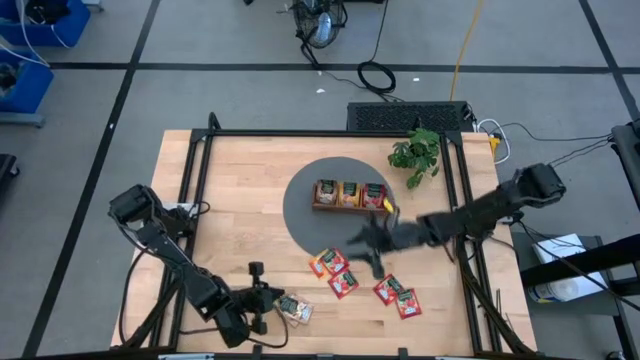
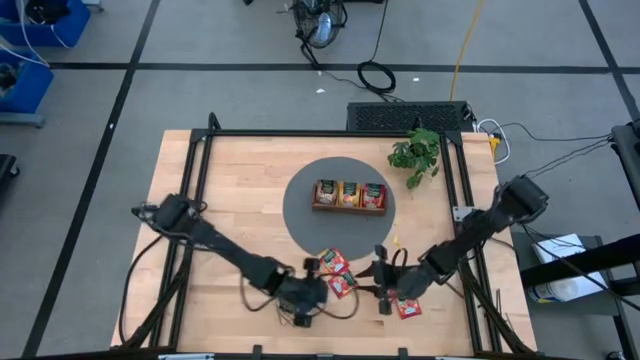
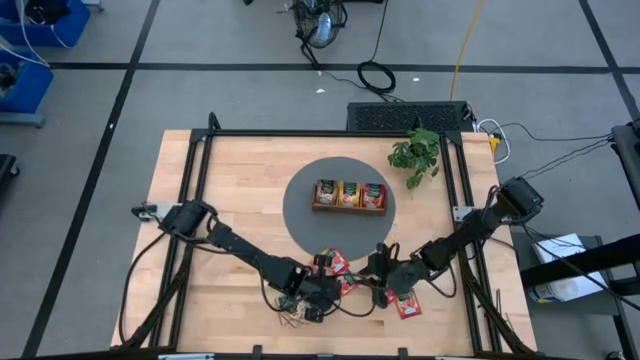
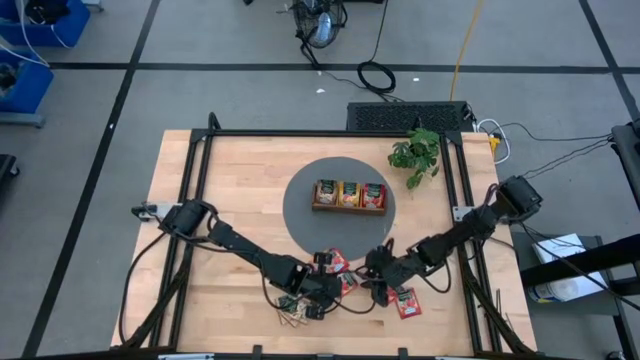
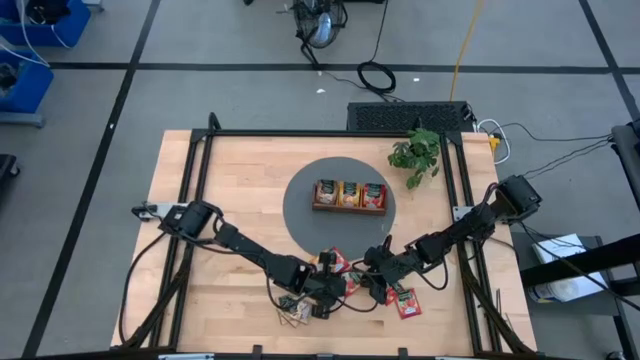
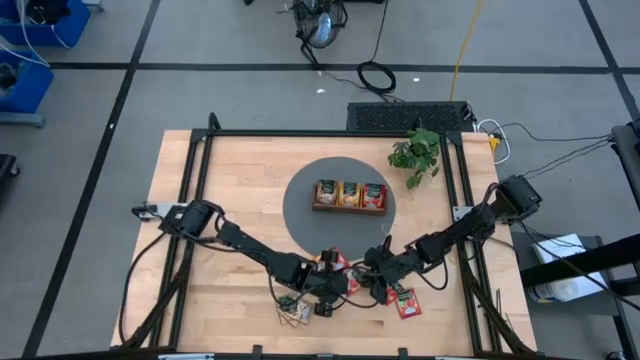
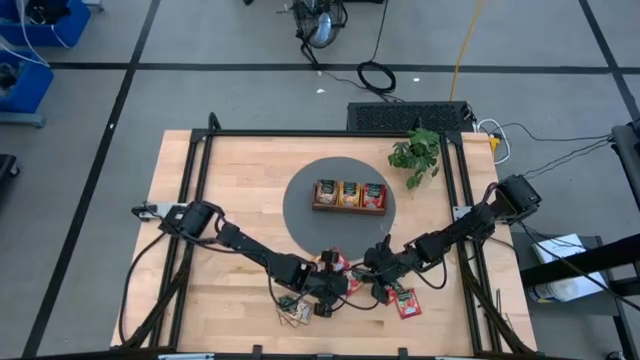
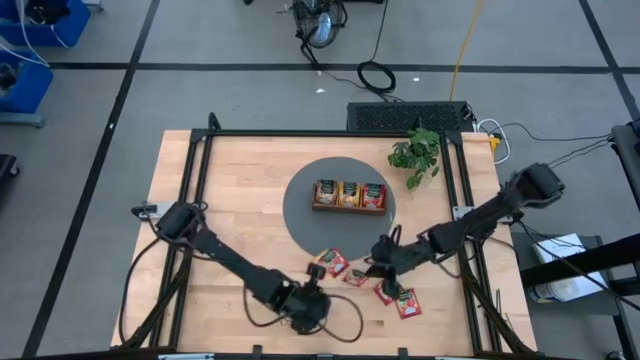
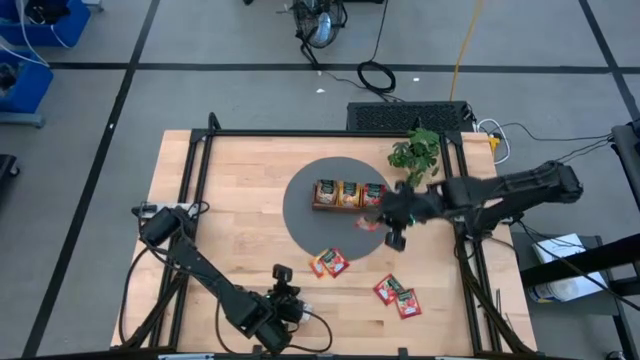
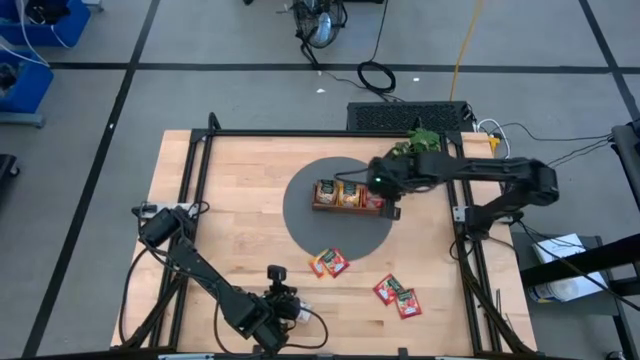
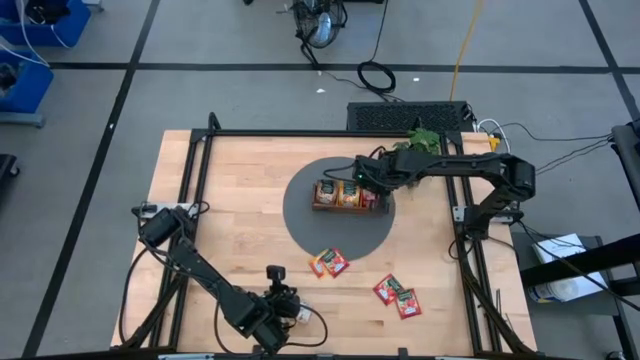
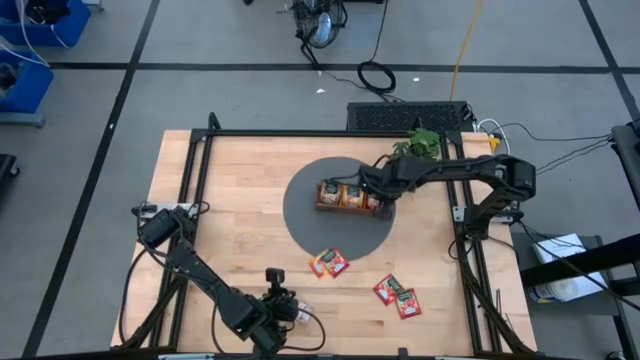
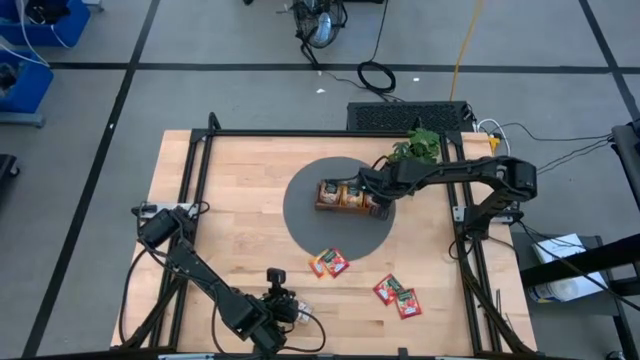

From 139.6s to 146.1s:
Task: Pick & Place Tea
Put the red tea bag to the right section into the wooden organizer

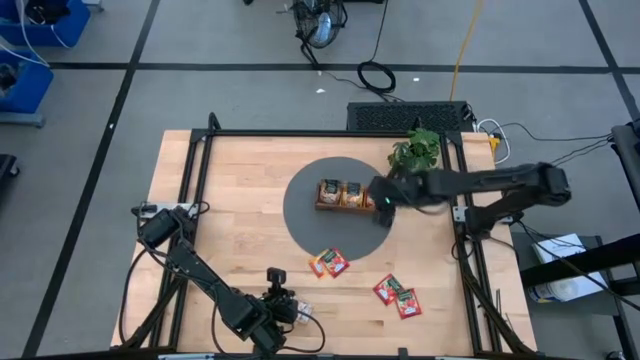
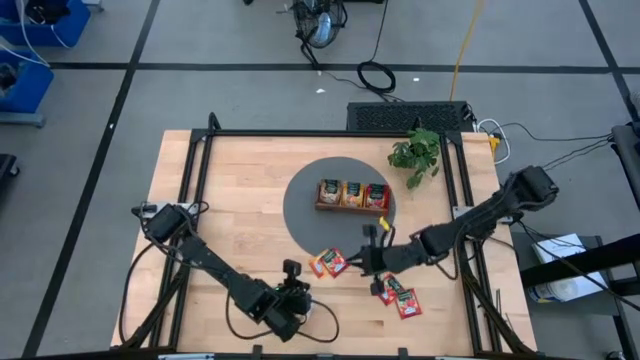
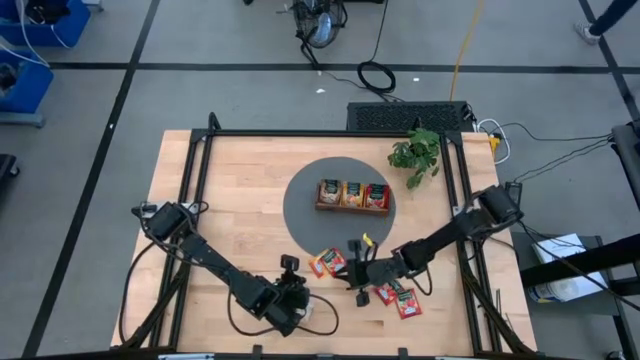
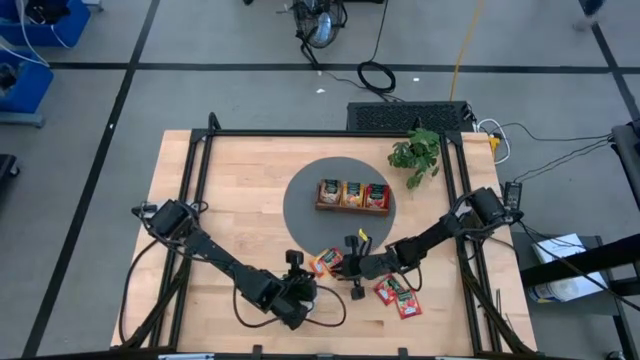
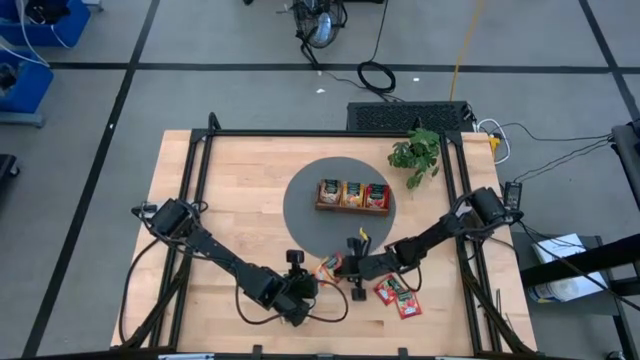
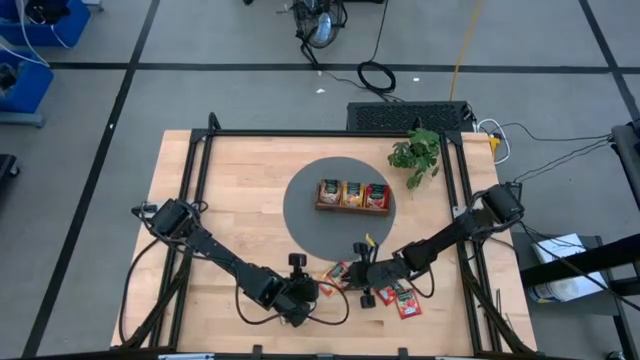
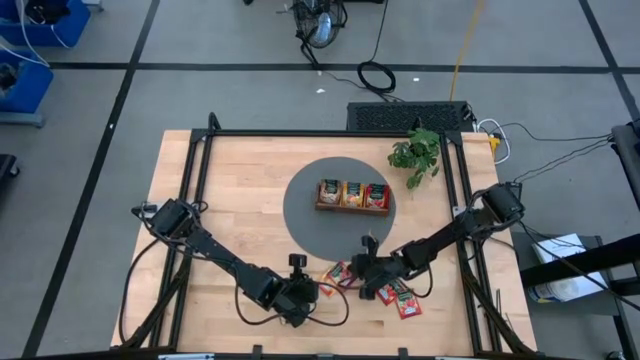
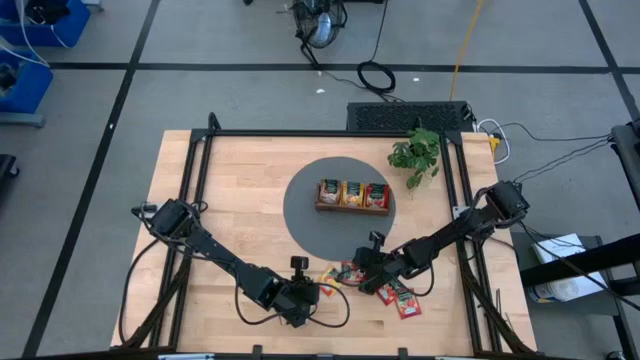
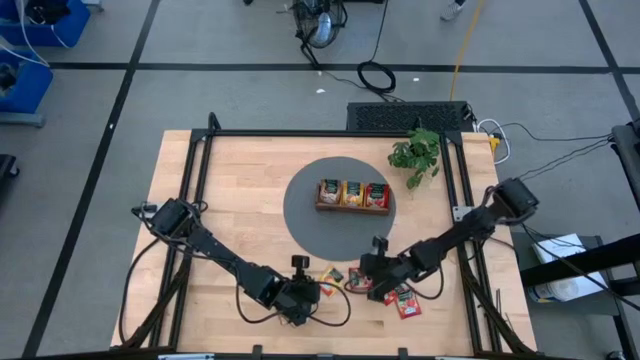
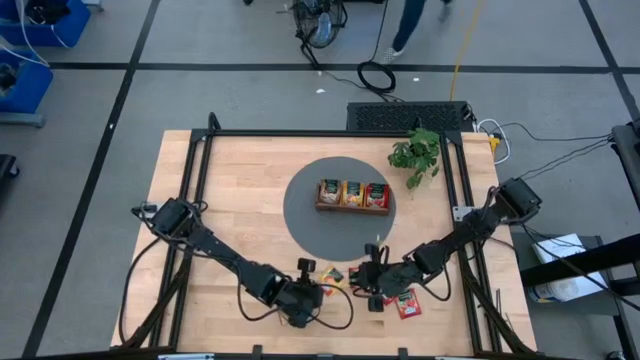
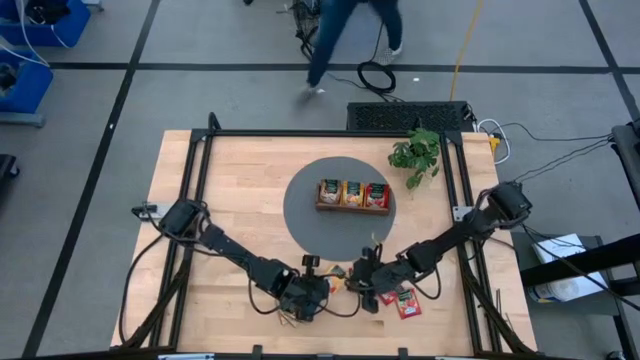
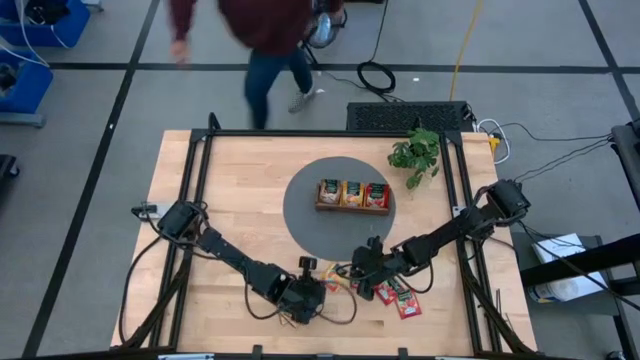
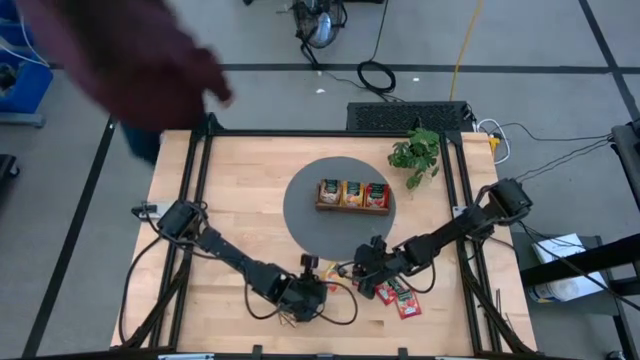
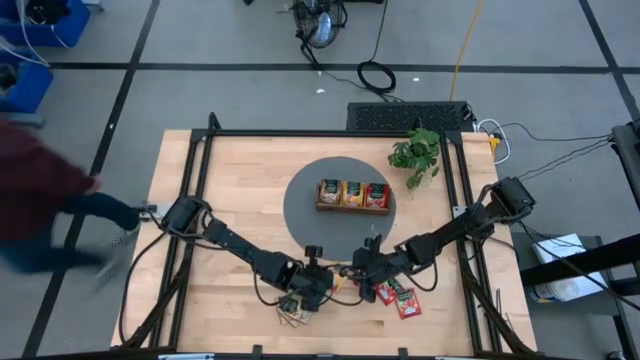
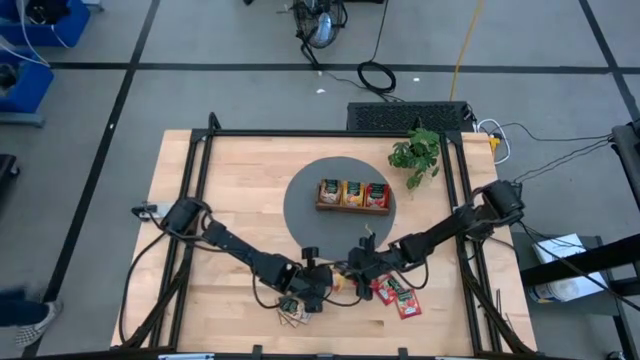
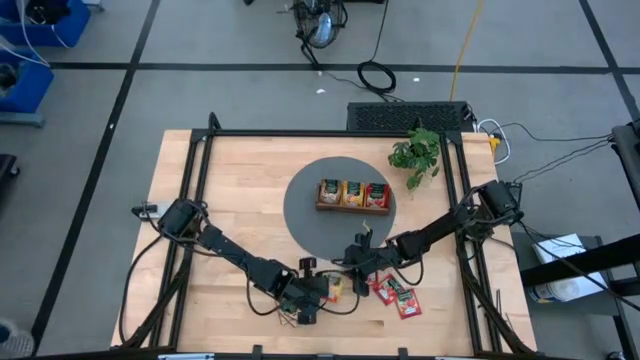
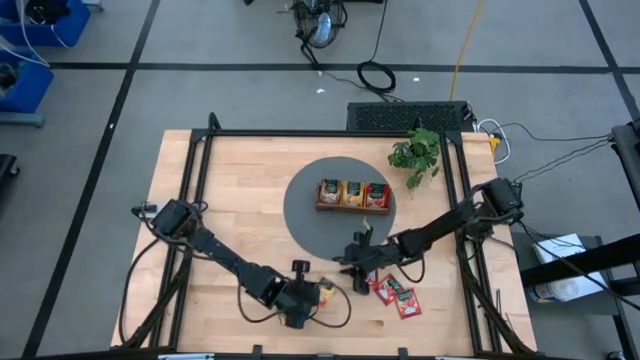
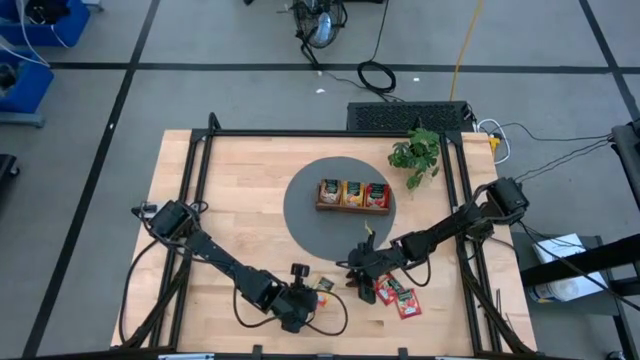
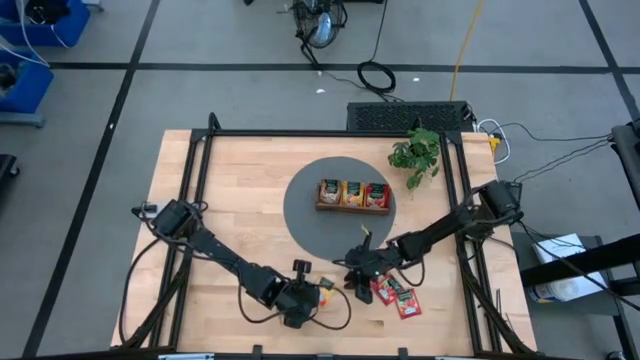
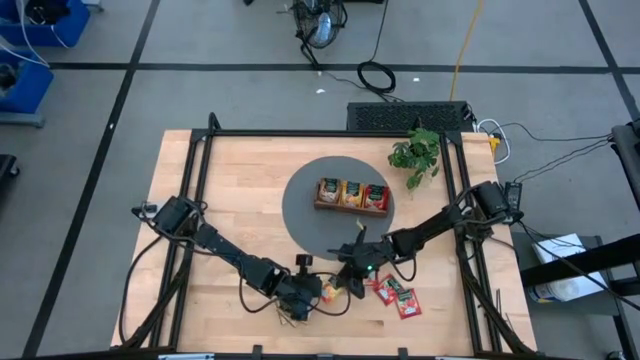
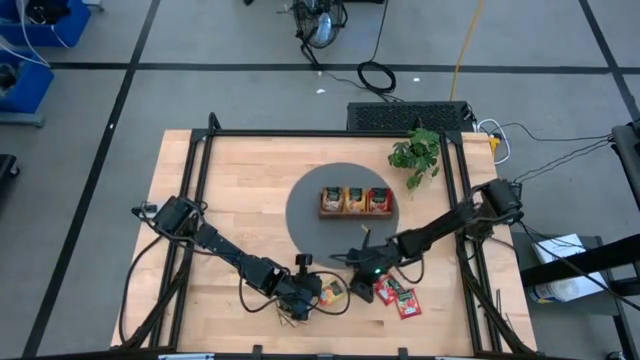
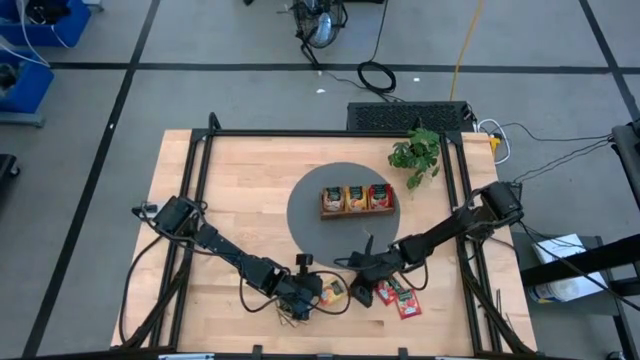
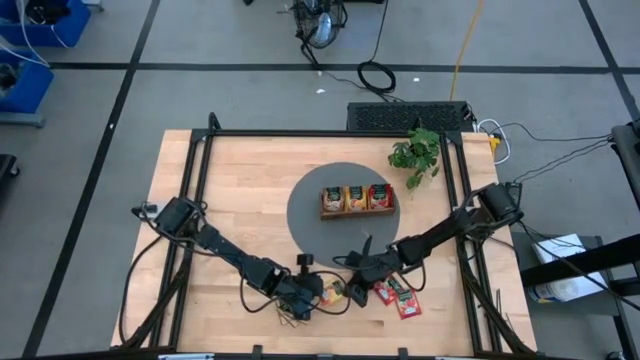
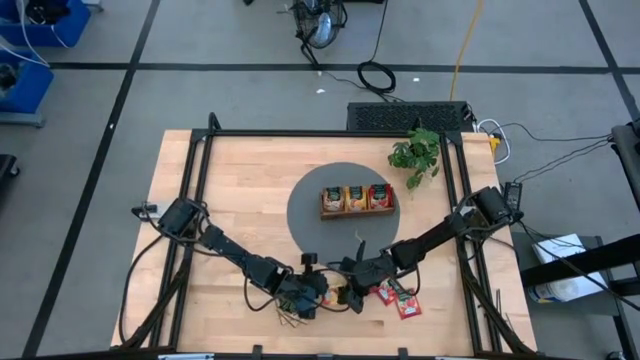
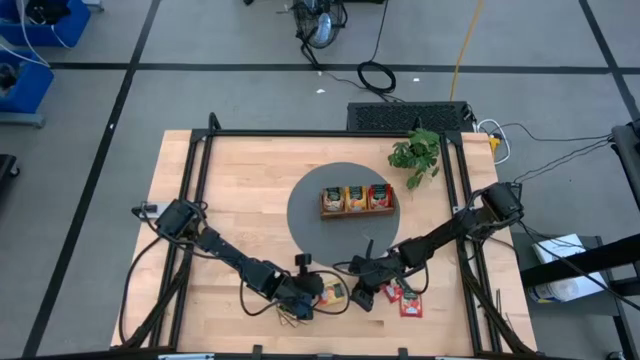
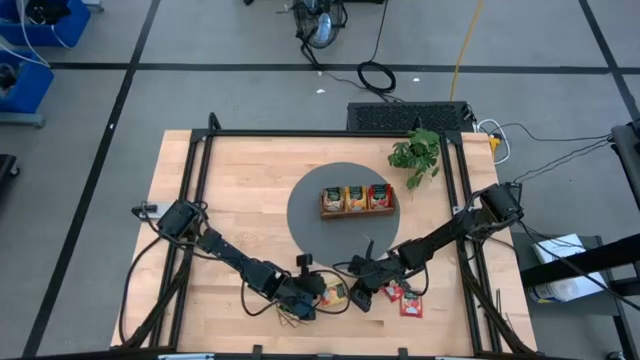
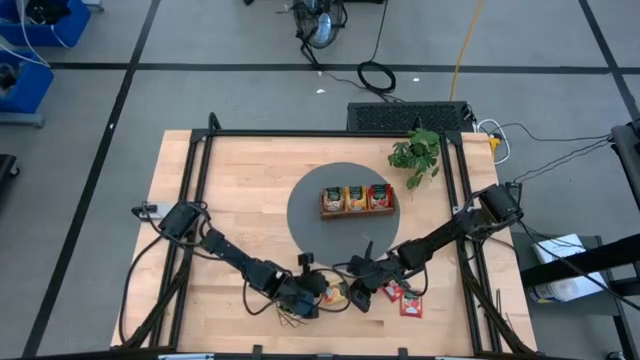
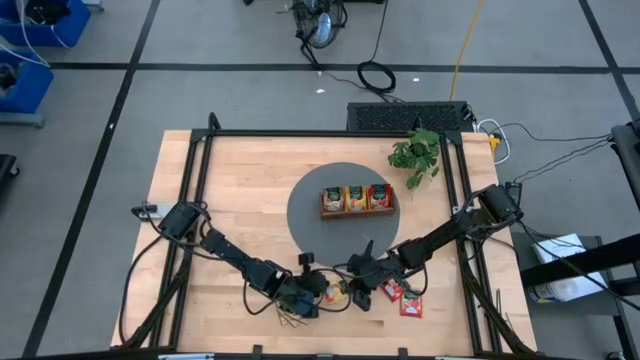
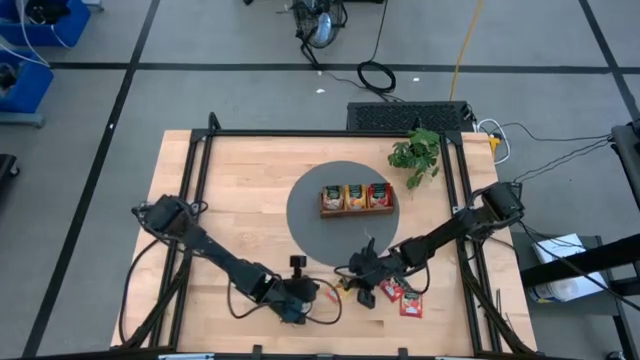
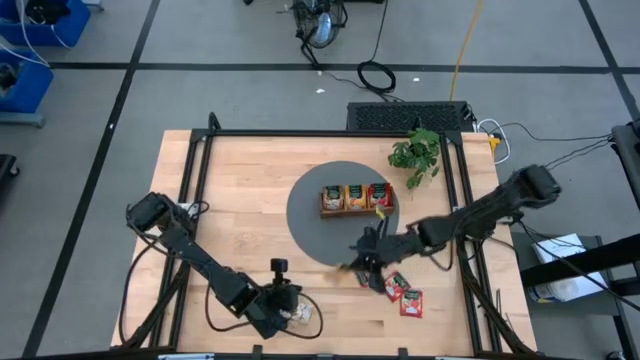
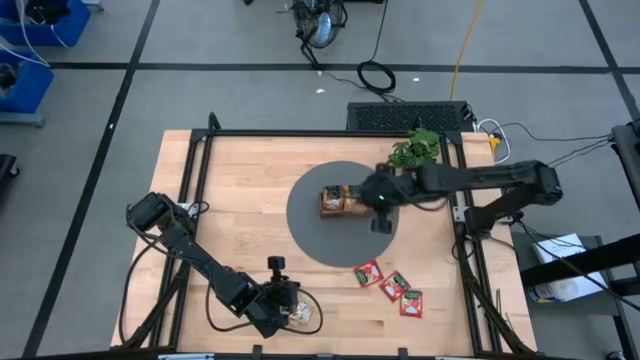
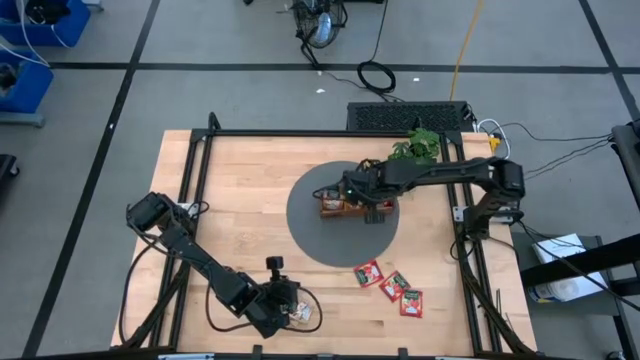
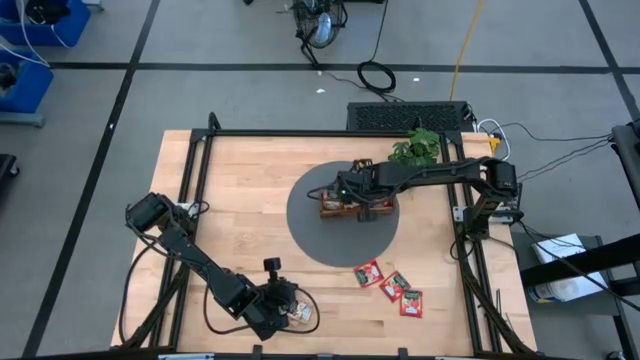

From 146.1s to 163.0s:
Put the yellow tea bag to the middle section into the wooden organizer
